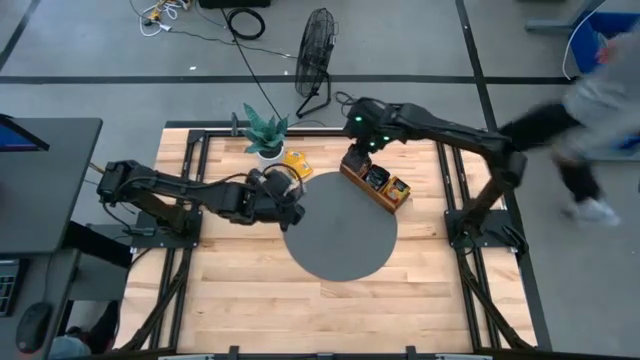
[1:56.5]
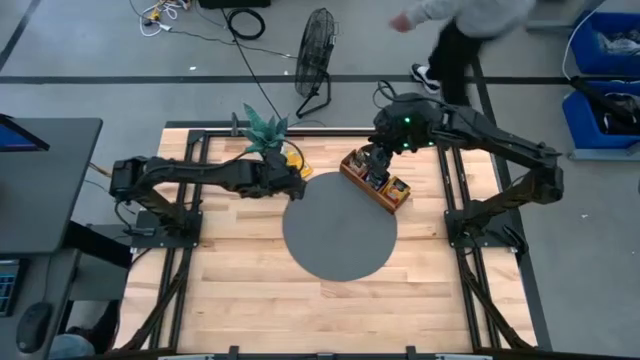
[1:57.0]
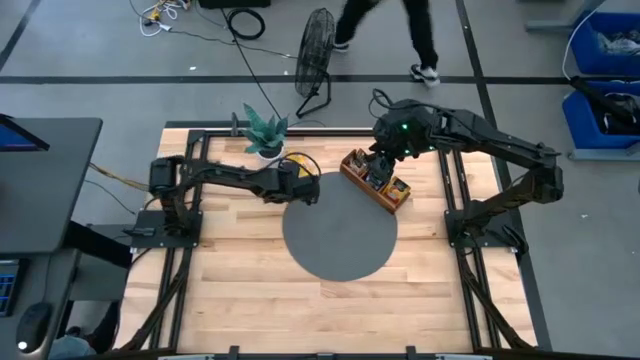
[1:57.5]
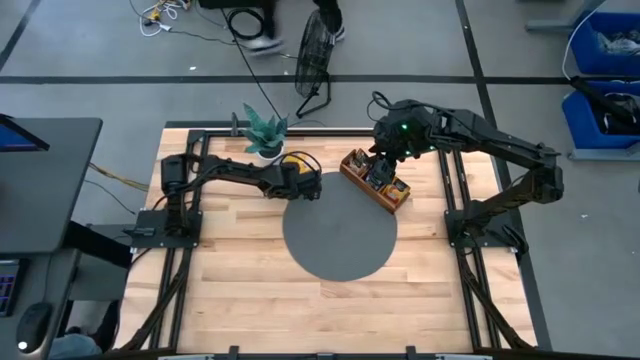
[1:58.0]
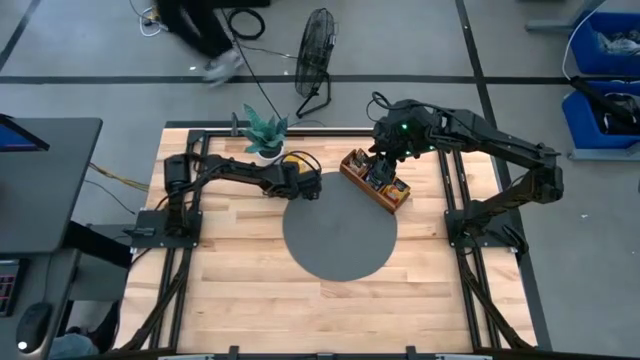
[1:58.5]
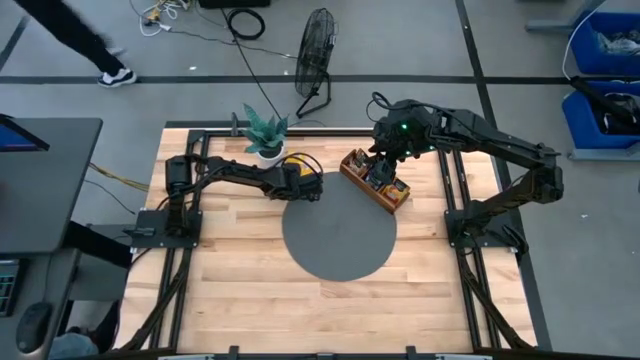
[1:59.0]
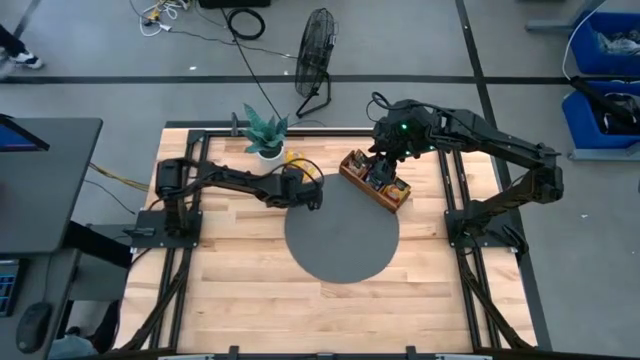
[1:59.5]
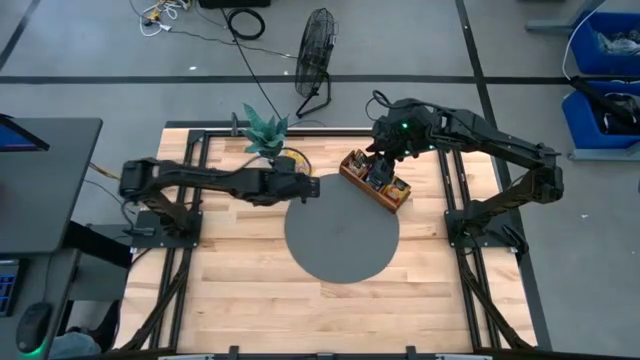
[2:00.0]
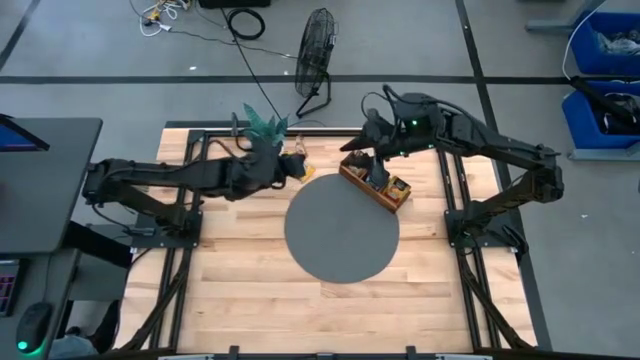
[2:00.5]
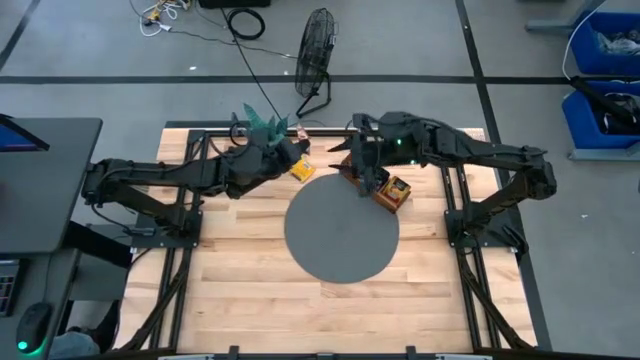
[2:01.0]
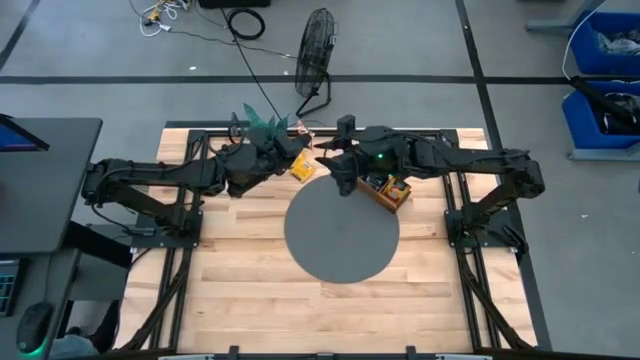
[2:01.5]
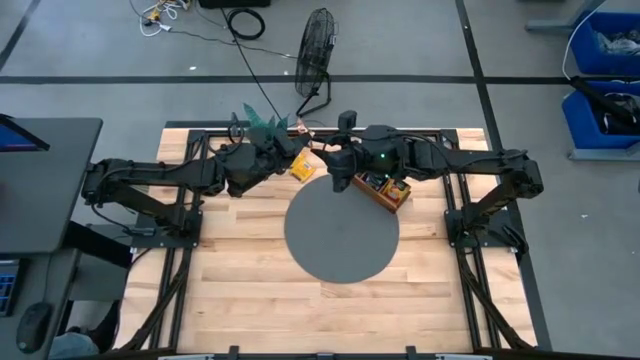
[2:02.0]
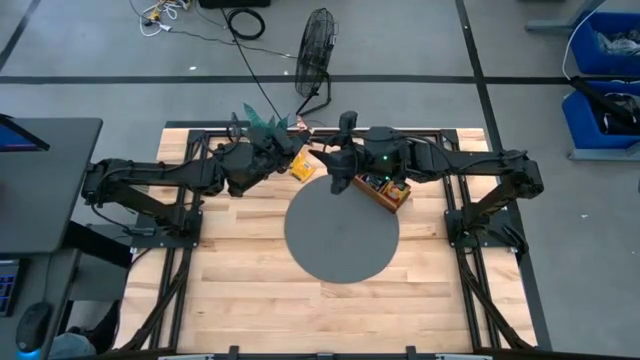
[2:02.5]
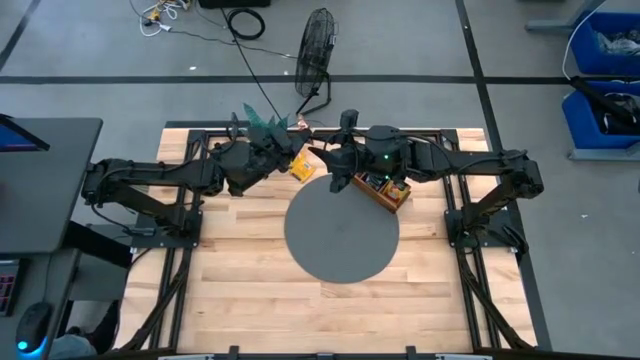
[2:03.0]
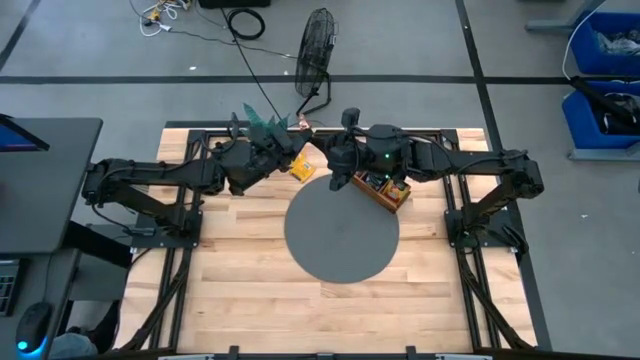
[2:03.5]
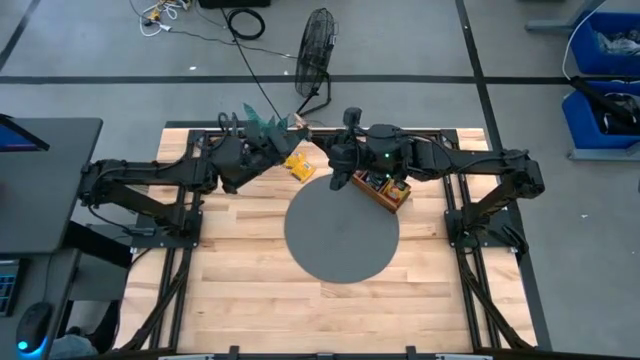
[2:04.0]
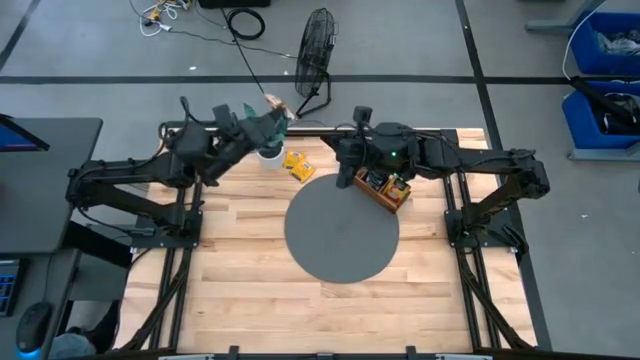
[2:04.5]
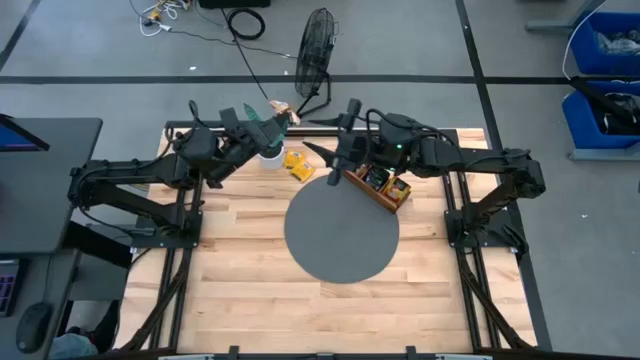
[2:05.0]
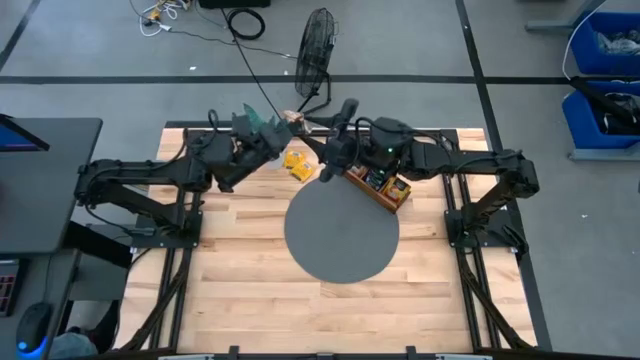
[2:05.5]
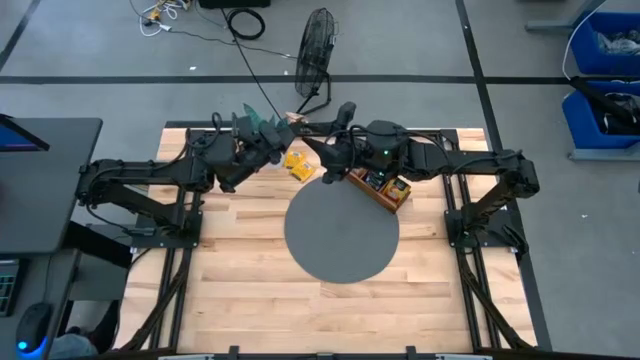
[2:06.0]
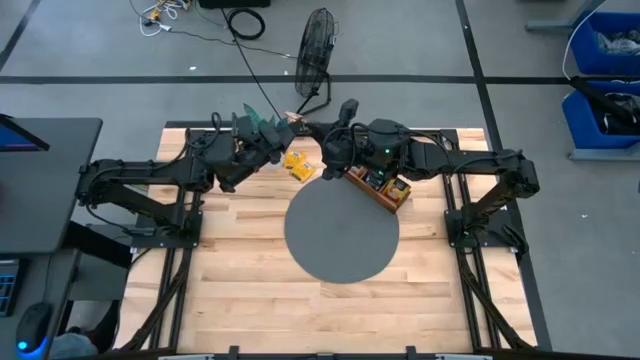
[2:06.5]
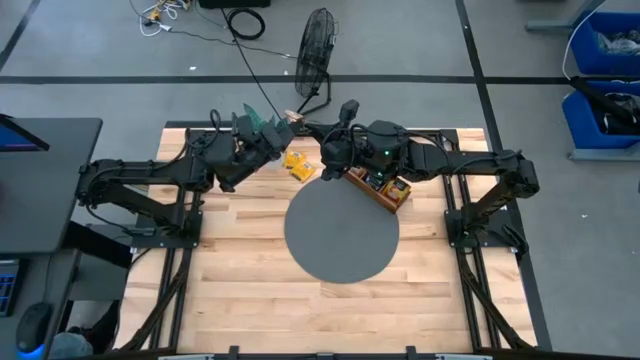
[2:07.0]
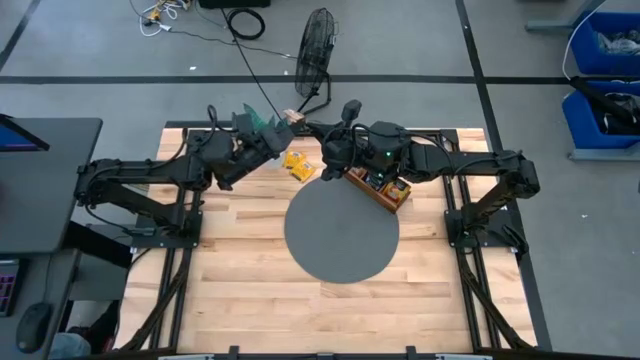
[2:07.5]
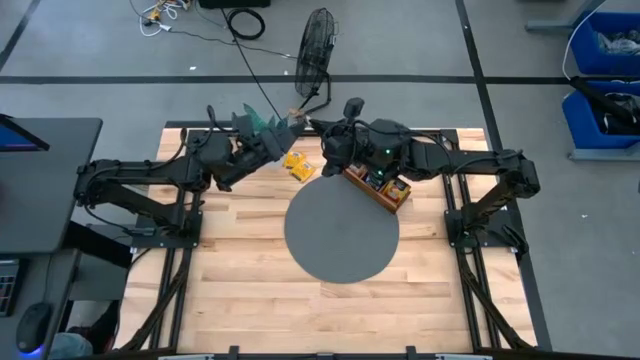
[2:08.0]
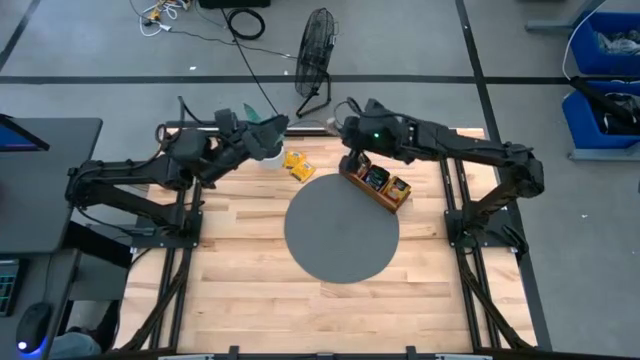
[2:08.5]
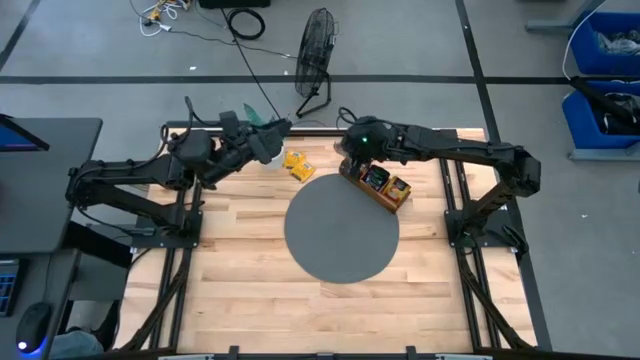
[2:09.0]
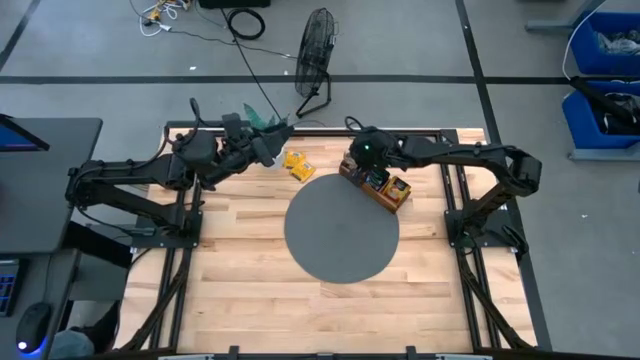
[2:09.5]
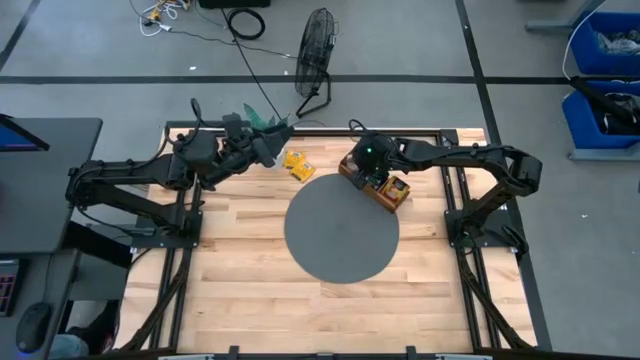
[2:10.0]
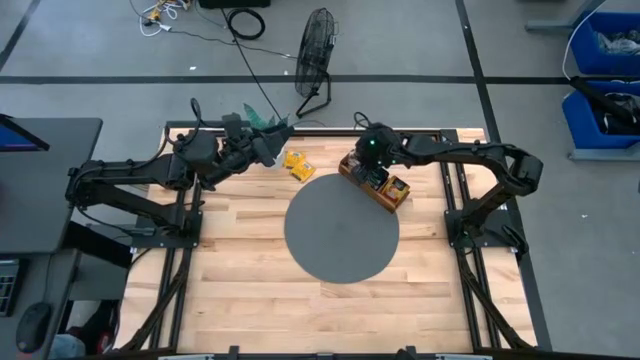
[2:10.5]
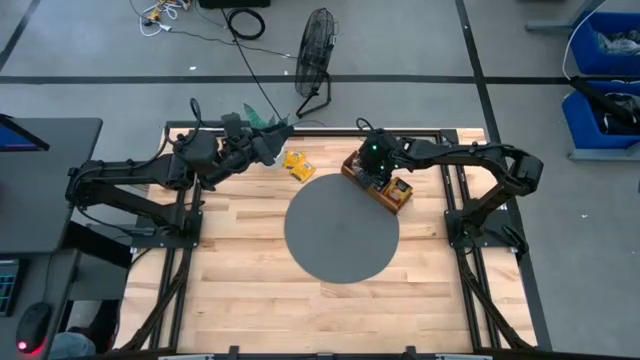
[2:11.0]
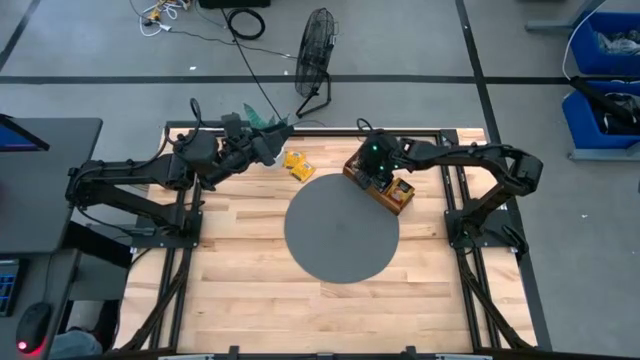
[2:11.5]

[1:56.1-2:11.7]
Task: Pick & Place Tea
Put the brown tea bag into the left section of the wooden organizer
